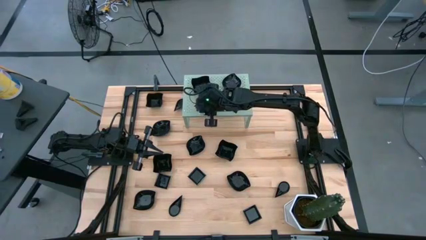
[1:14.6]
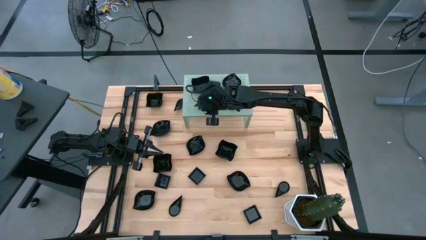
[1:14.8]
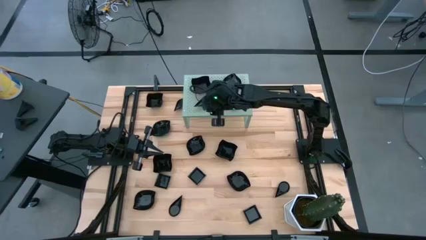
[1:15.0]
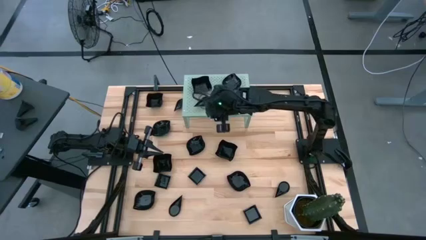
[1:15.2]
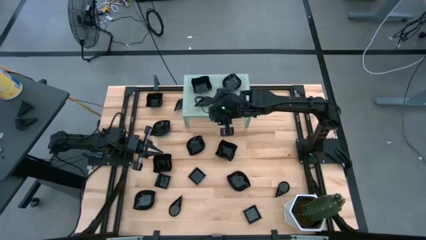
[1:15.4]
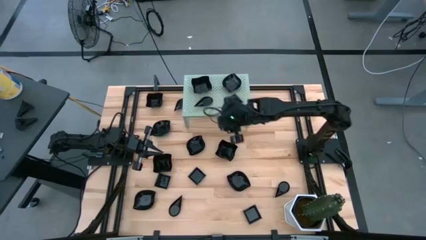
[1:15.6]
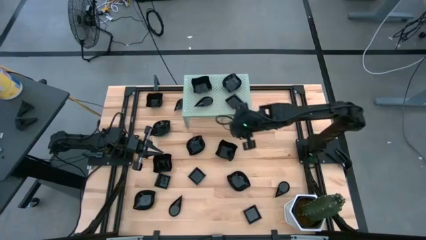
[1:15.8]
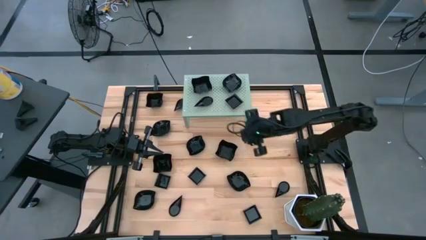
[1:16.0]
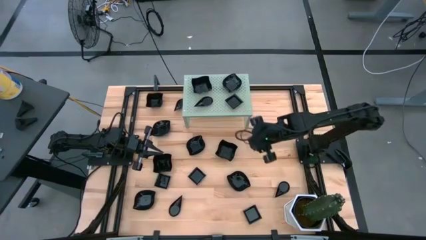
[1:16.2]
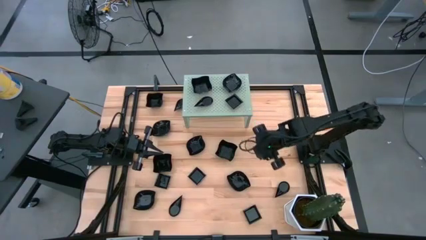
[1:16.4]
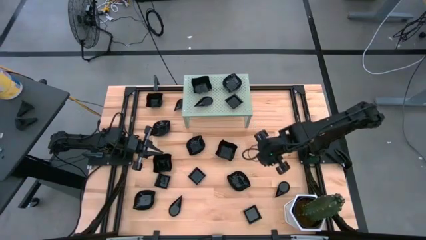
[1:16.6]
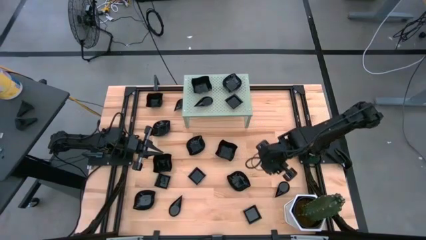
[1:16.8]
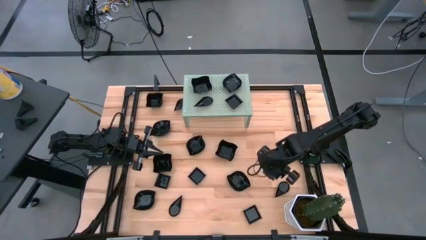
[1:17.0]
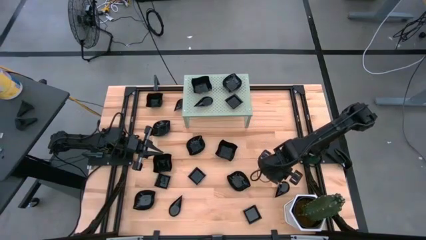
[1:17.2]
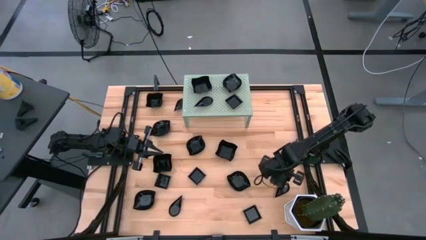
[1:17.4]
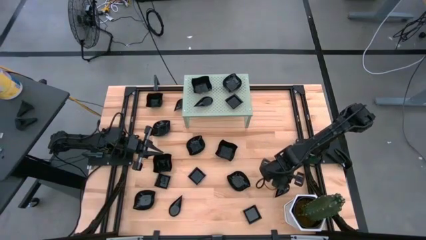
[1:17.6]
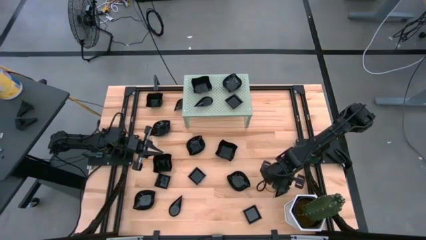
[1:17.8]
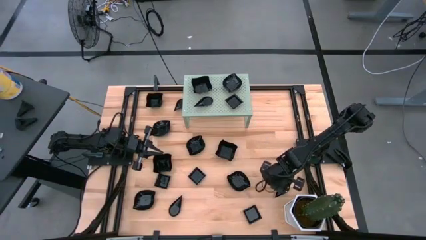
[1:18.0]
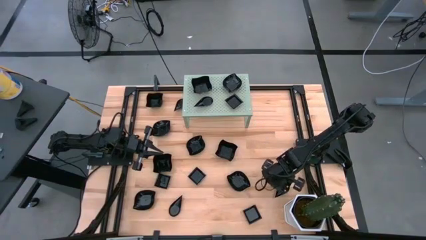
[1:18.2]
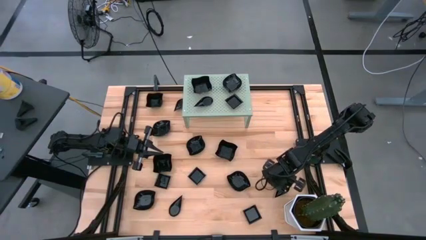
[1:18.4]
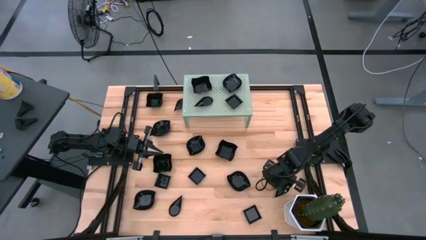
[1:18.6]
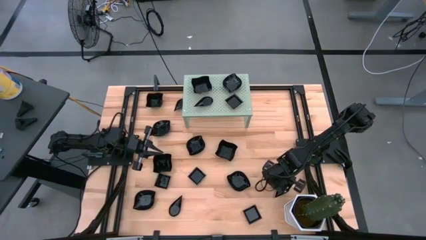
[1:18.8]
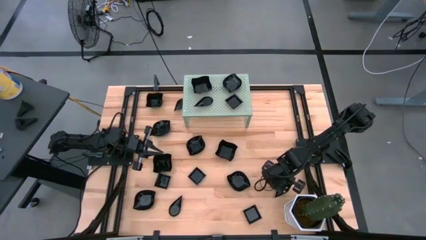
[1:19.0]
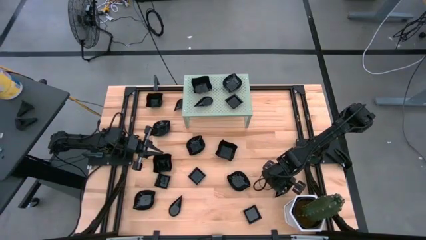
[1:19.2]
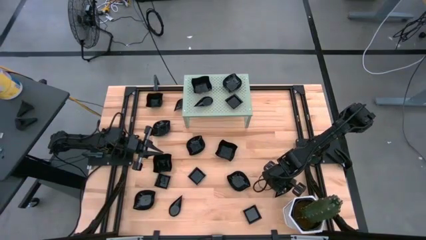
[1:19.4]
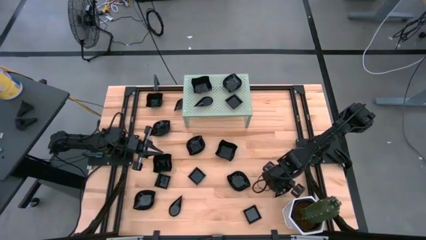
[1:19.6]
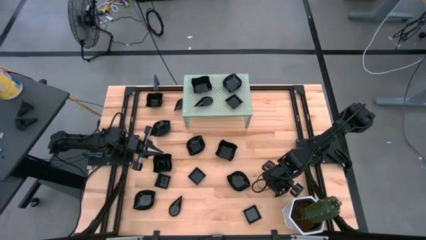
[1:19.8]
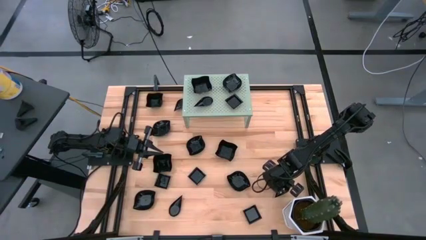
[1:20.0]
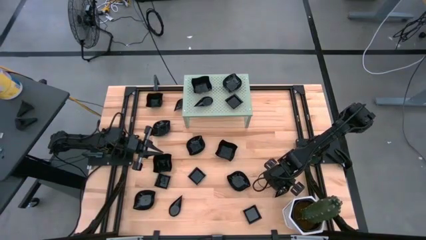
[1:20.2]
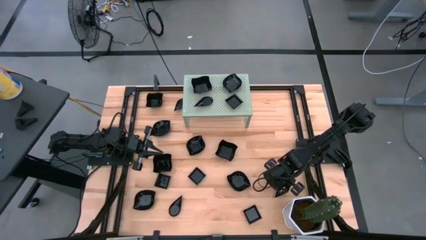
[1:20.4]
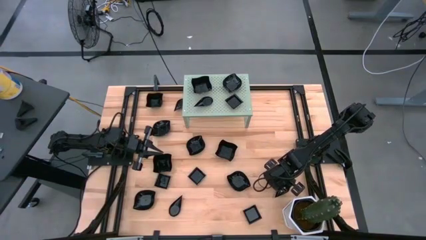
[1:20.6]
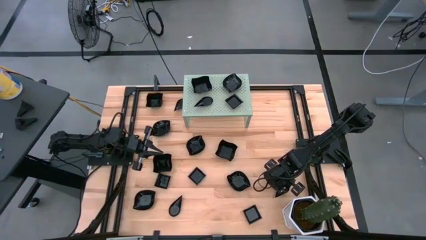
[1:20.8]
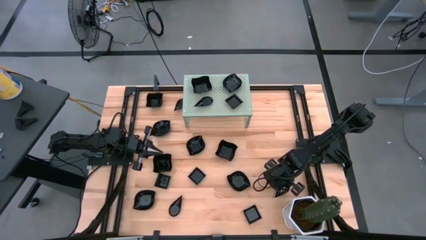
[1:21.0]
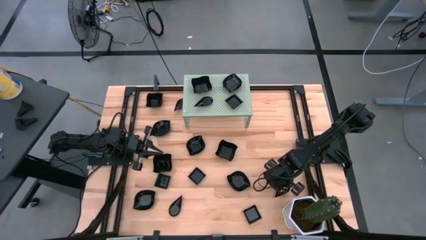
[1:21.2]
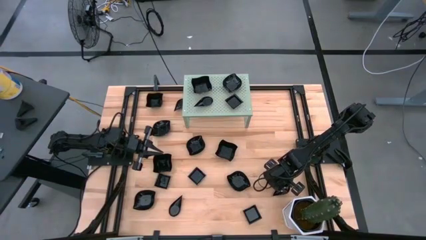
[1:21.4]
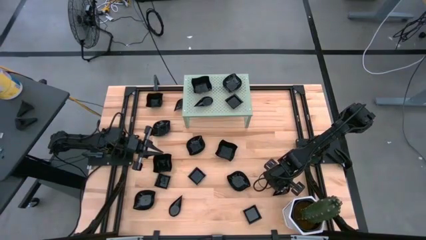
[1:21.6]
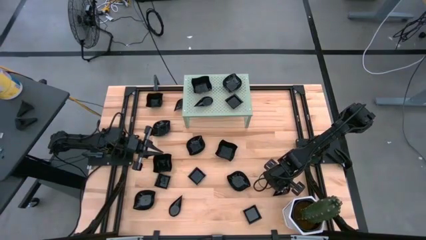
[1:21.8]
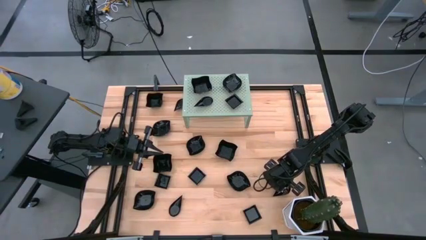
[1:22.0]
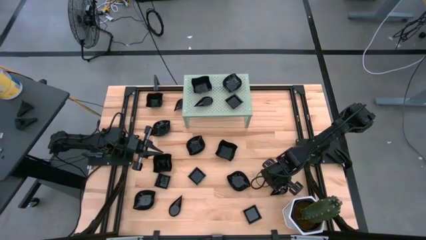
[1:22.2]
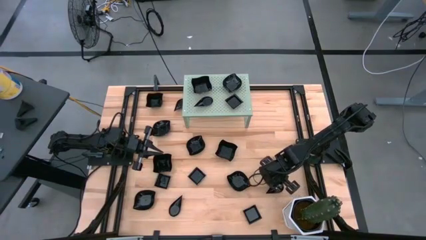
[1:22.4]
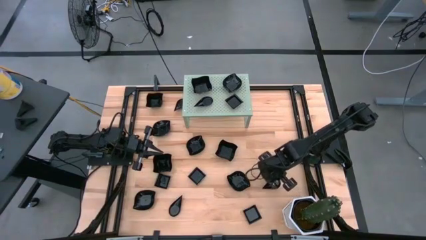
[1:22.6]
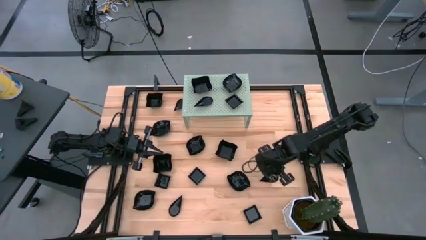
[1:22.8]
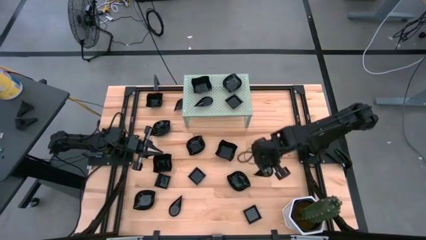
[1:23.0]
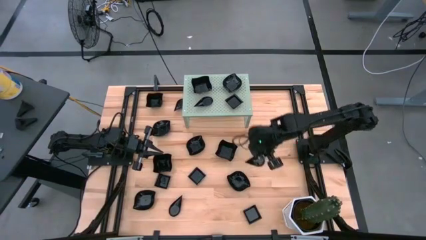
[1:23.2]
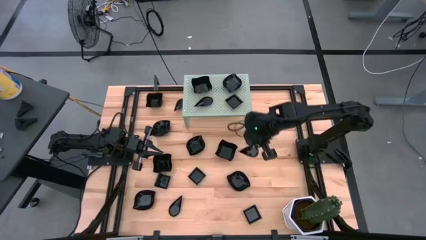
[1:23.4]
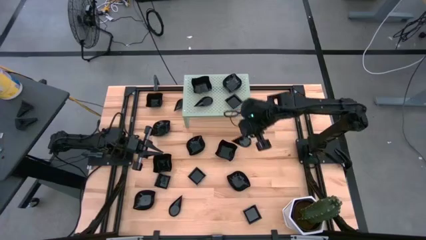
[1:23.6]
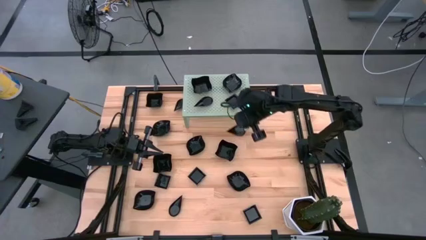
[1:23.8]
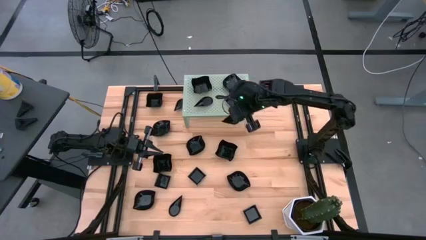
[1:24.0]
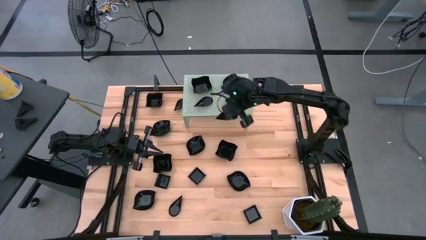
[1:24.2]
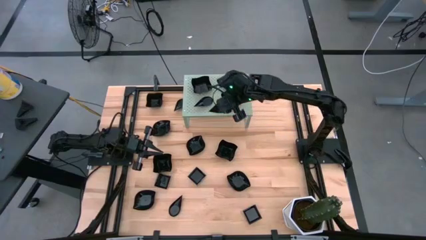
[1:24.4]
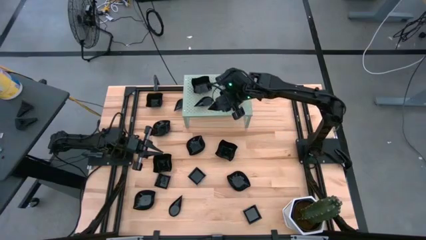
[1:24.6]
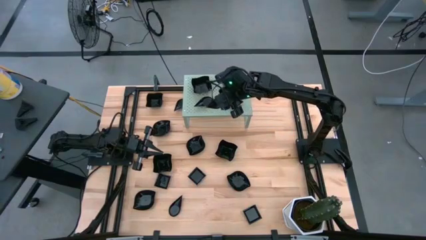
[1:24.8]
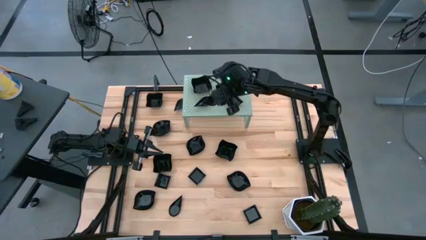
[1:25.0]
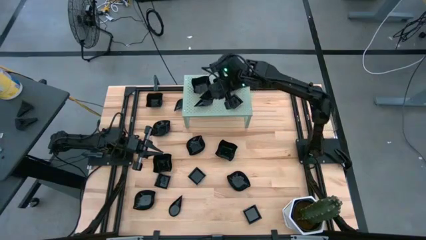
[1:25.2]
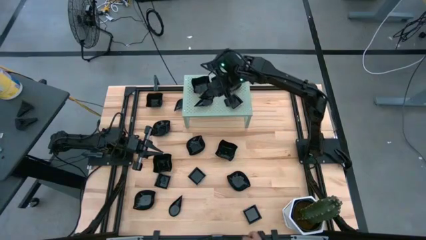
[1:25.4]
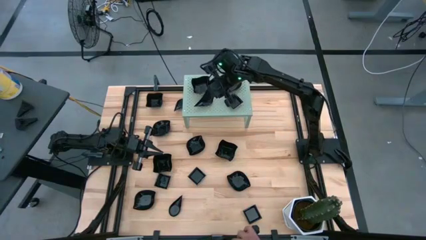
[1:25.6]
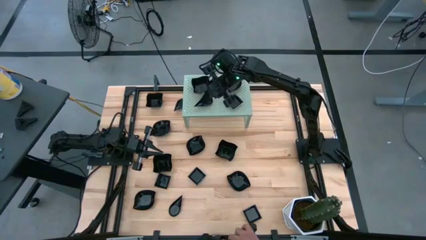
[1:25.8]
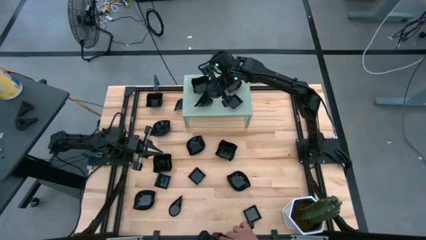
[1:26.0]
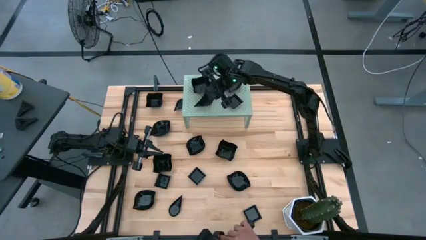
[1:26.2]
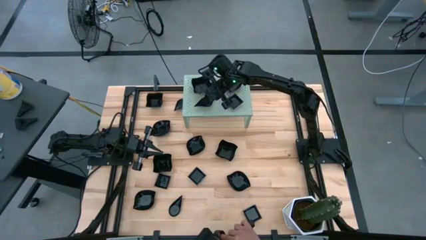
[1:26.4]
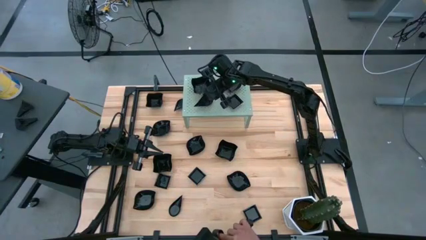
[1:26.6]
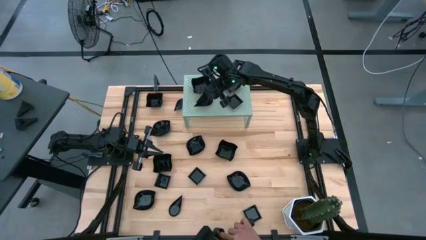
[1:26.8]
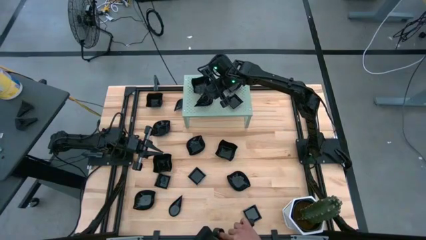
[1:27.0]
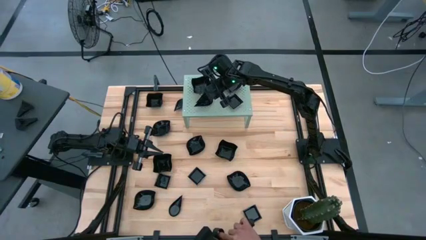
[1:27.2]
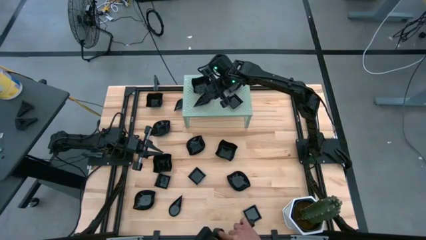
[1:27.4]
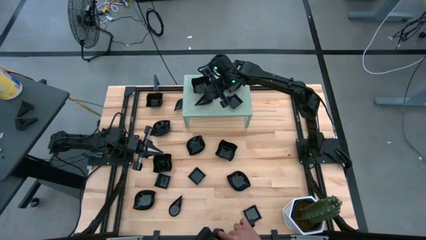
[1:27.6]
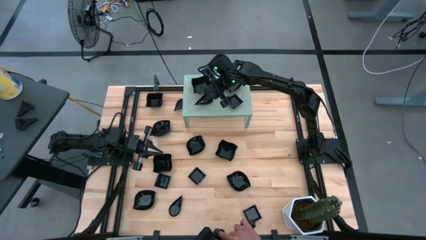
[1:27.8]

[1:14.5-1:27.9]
Task: Pick & Place Mini shaped plates
Stack the drop shaped plate on top of the drop shaped plate on the shelf

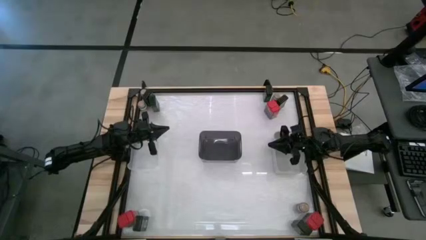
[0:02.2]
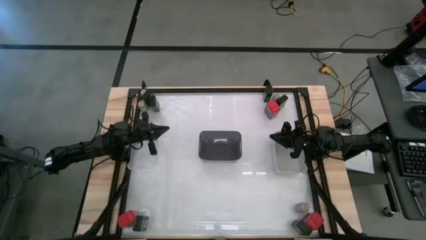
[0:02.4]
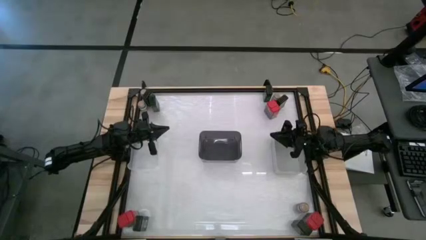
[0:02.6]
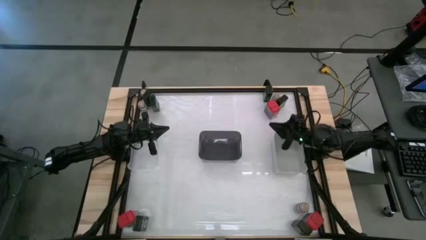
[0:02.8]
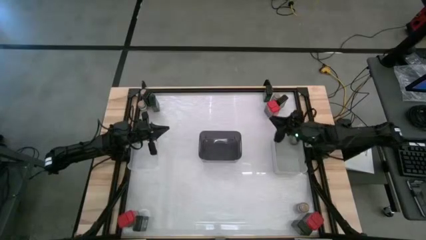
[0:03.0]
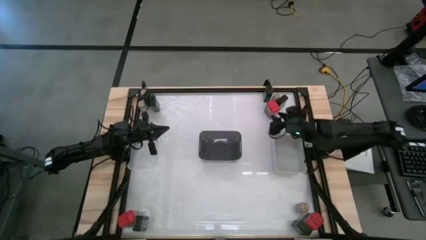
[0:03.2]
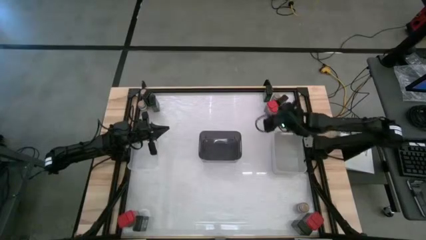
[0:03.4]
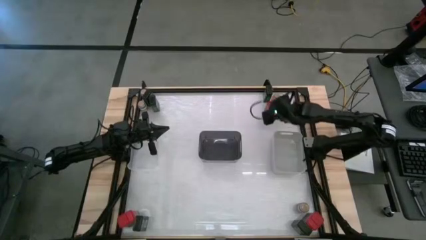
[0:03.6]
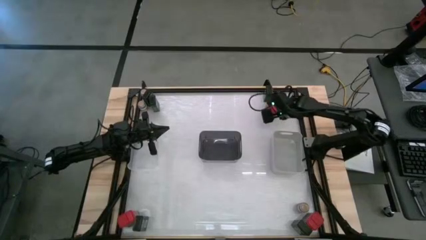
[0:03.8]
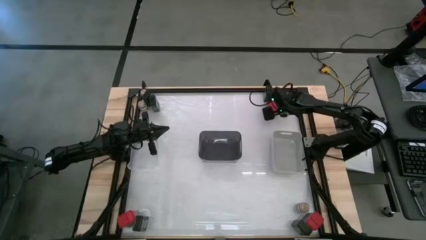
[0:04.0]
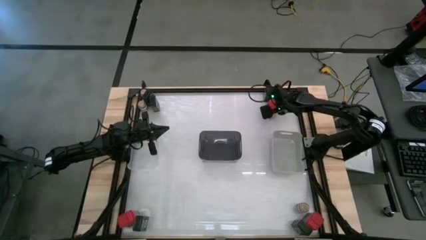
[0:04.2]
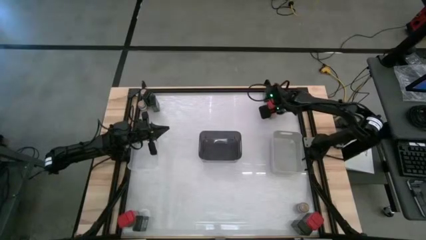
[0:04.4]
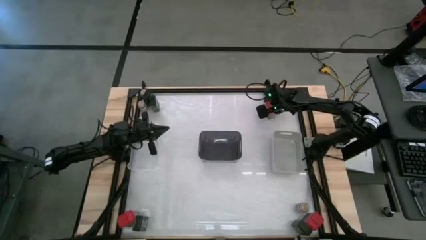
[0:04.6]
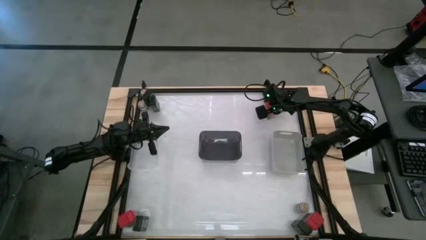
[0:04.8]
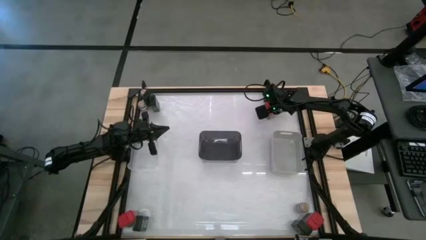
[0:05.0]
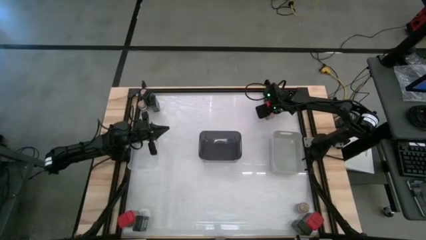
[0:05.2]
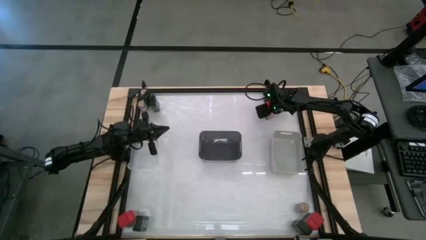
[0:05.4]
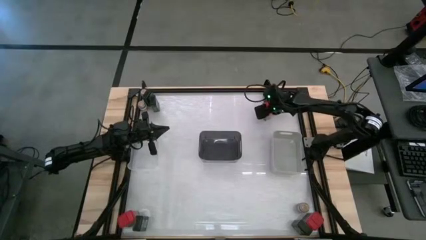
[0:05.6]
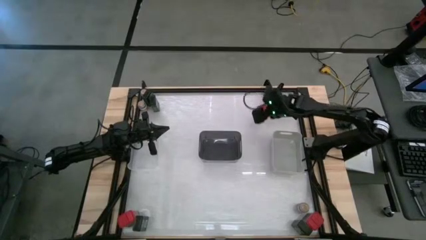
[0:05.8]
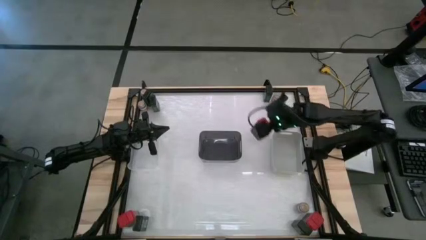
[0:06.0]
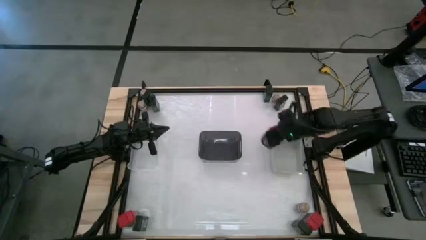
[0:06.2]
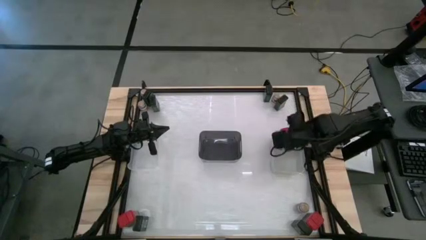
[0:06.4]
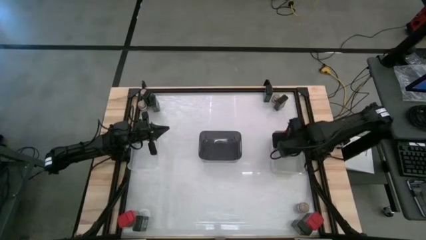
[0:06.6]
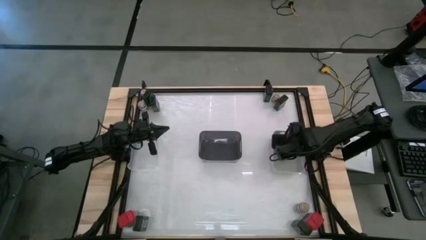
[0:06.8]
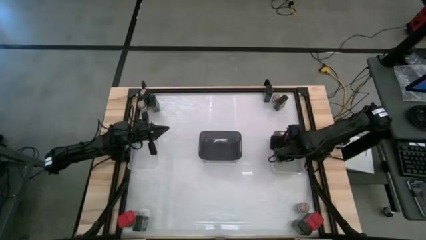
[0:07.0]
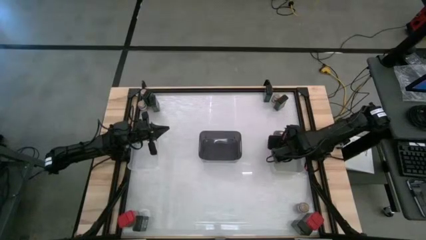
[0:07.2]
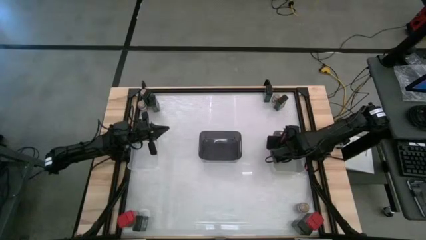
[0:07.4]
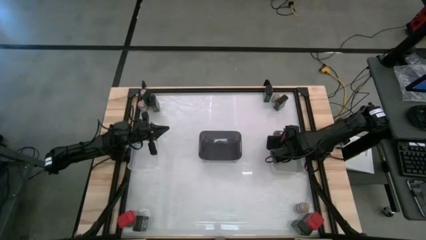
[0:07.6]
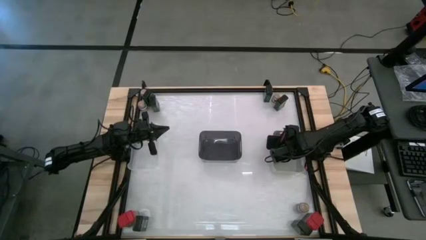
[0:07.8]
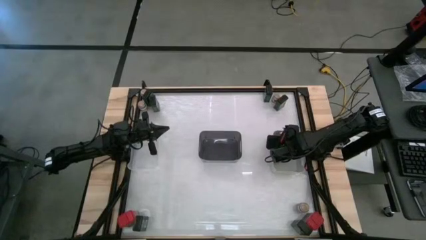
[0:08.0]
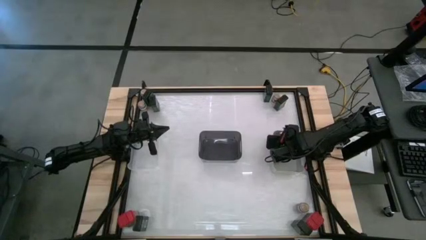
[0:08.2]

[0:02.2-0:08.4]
Task: Sort spices by type
Put the red spice can into the white bin
